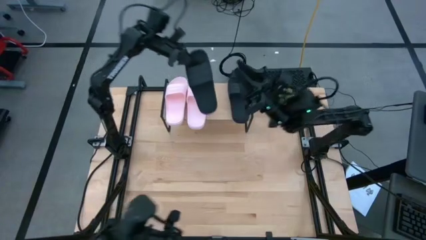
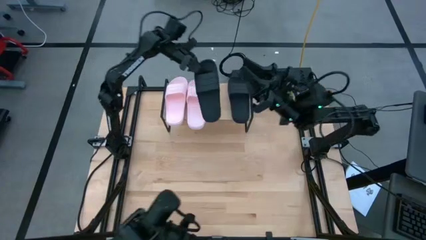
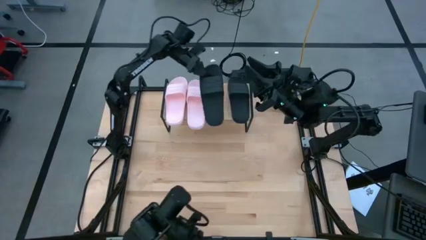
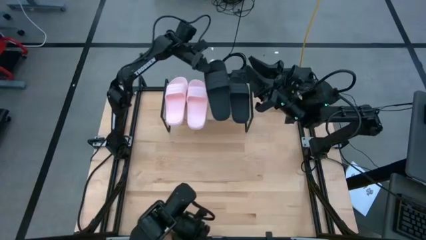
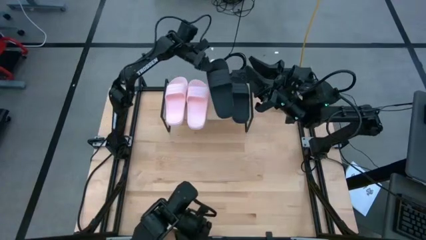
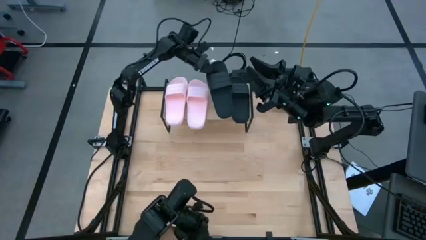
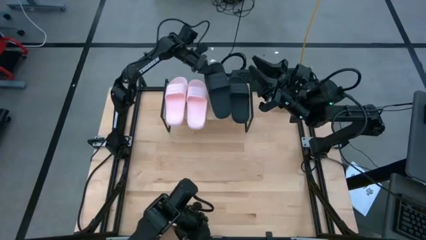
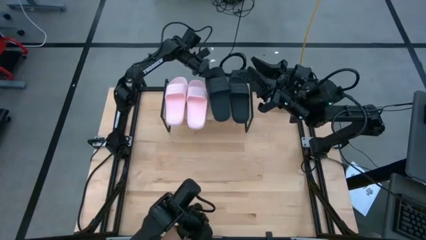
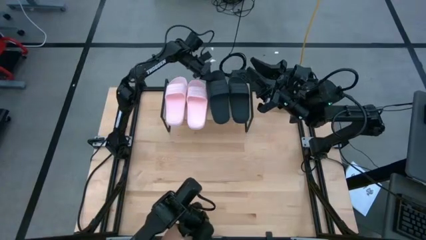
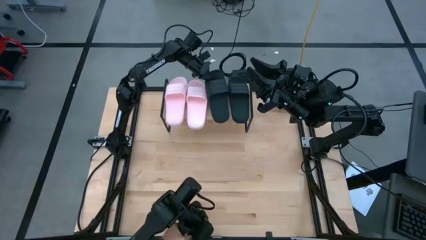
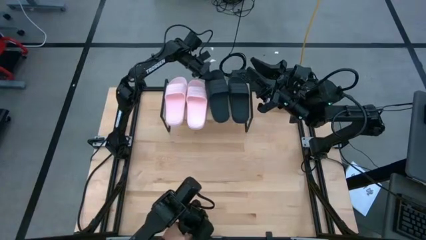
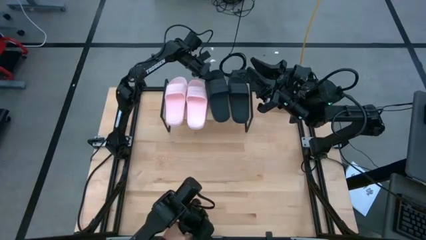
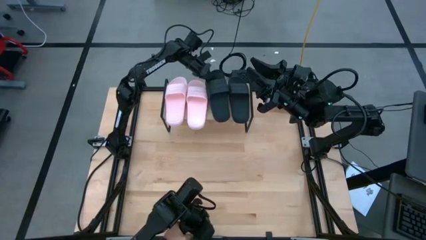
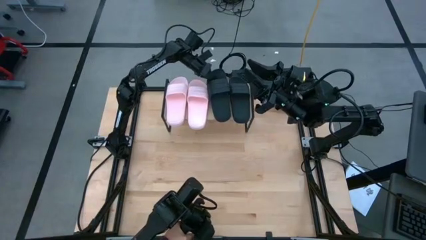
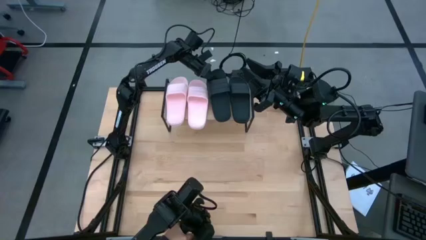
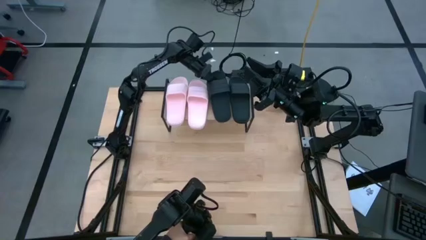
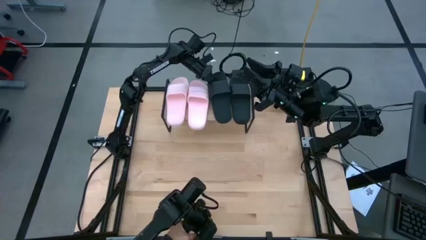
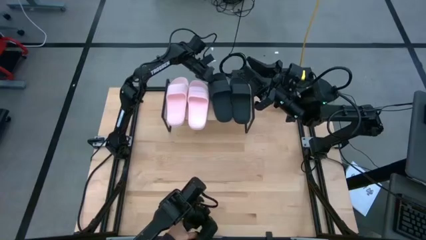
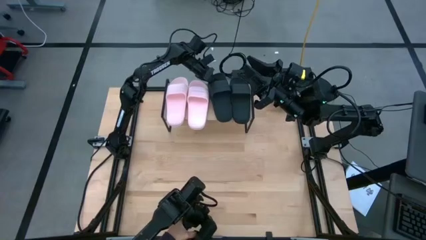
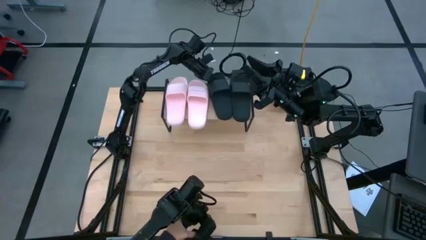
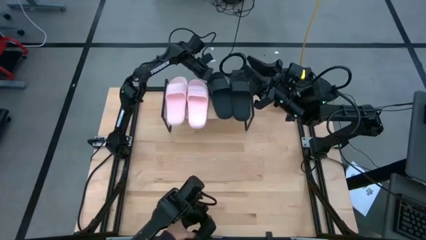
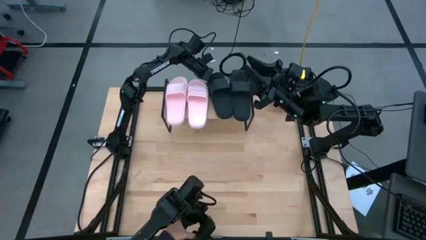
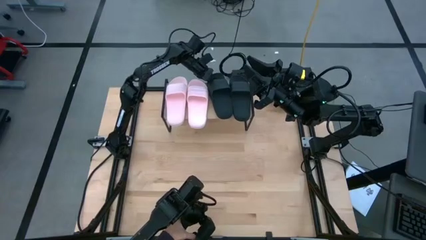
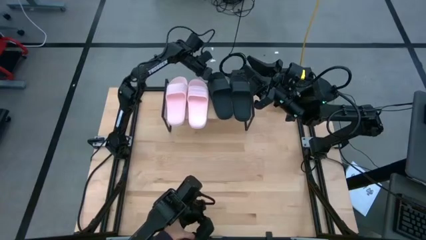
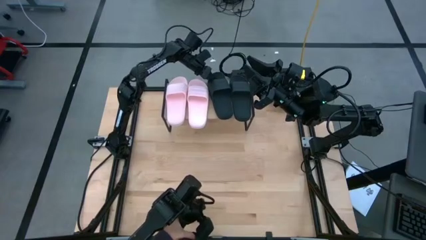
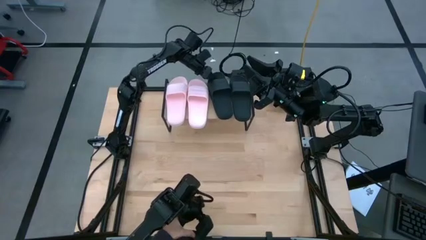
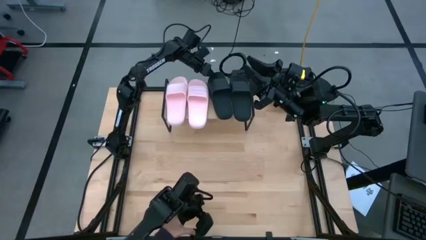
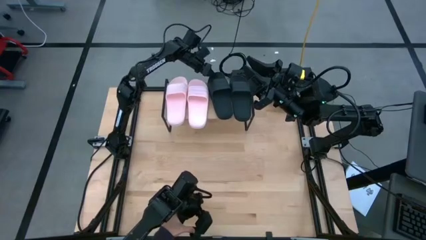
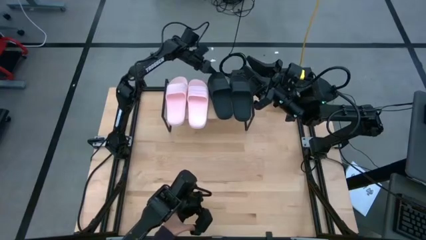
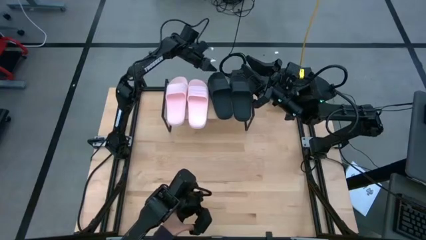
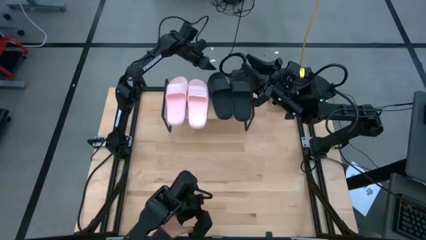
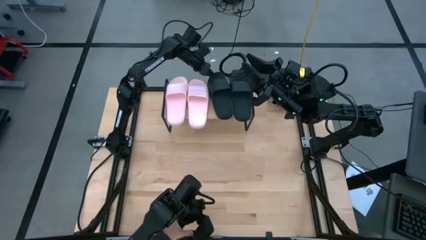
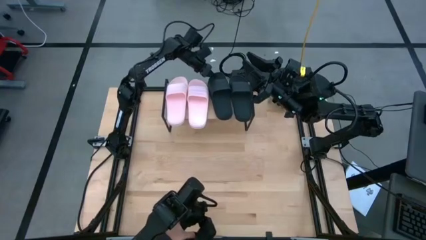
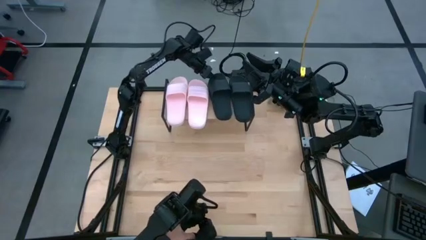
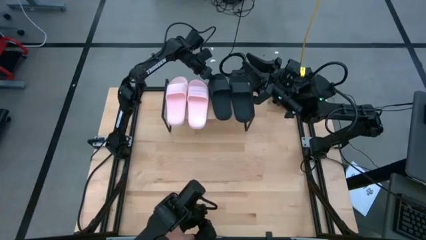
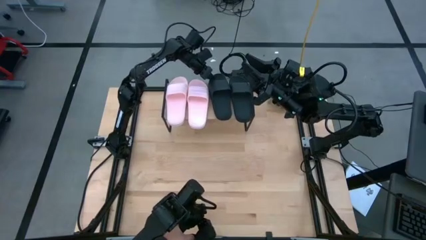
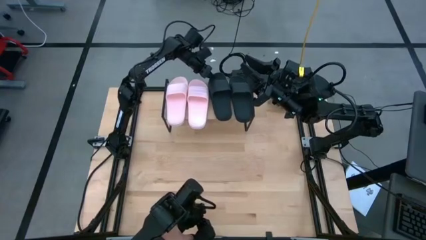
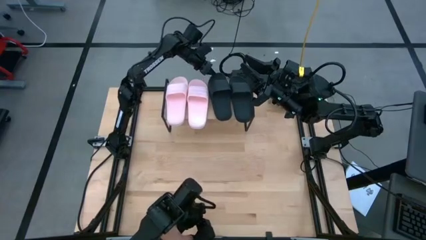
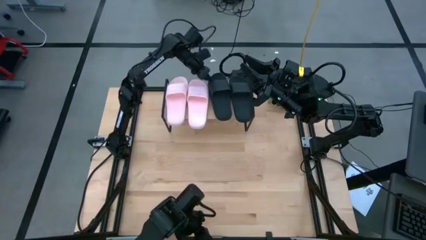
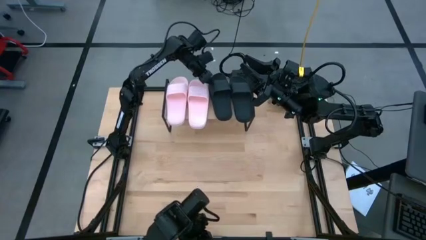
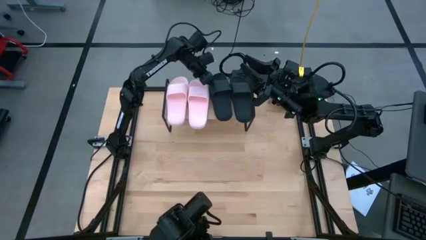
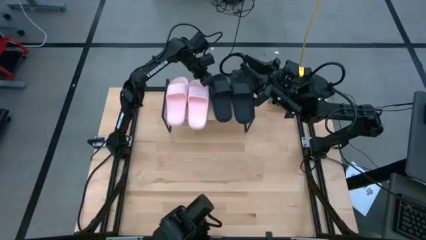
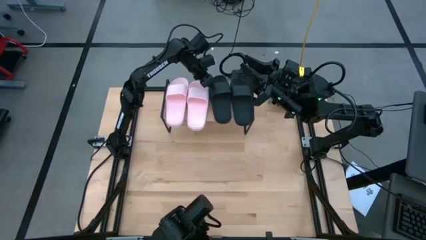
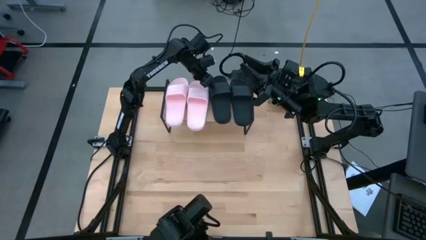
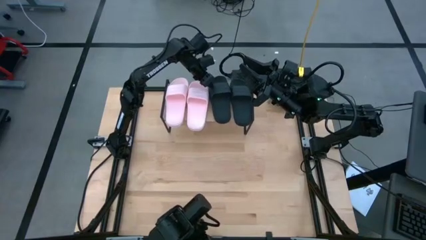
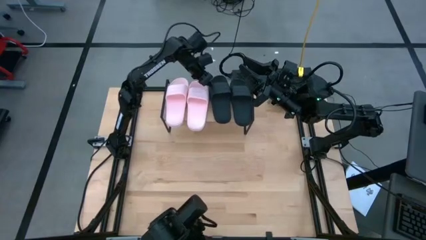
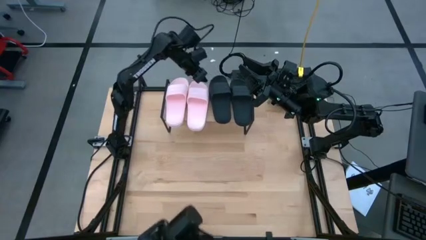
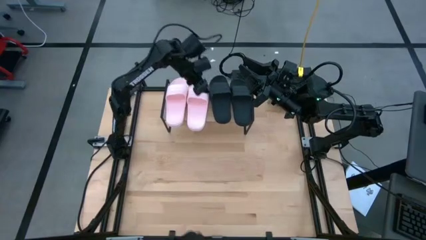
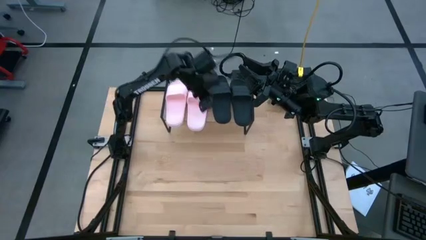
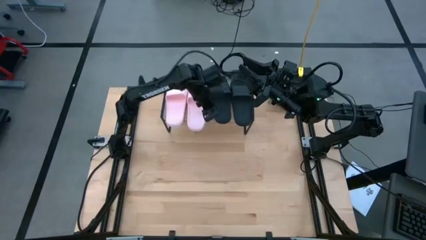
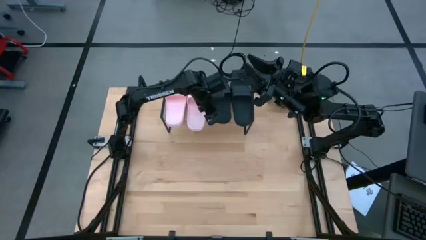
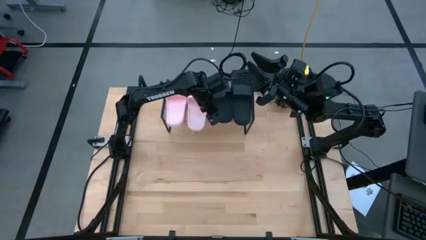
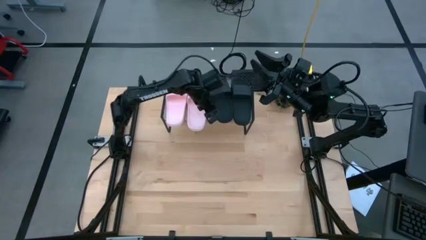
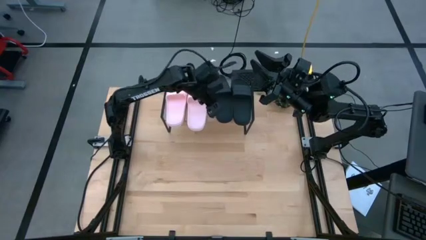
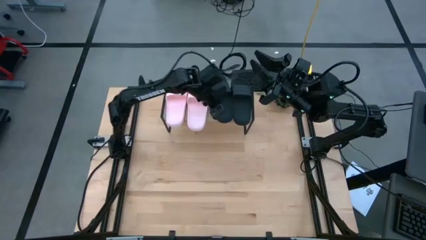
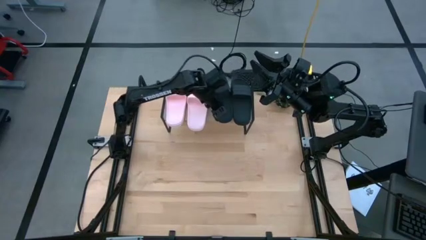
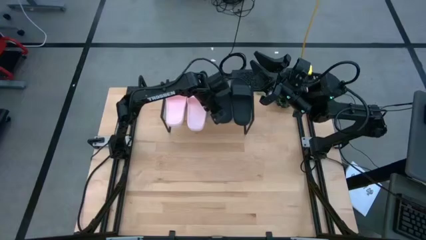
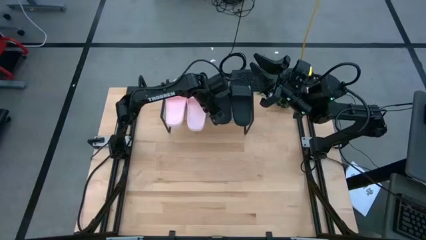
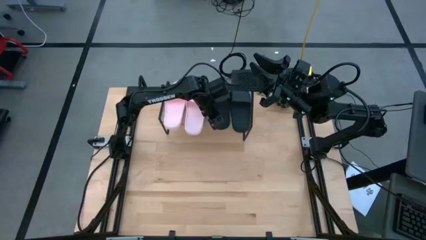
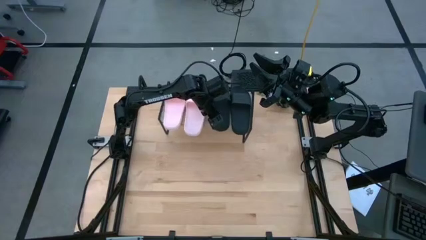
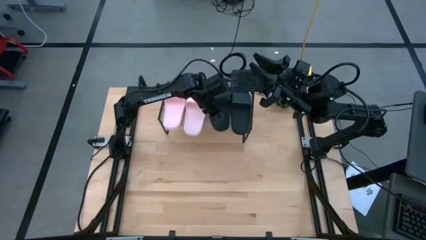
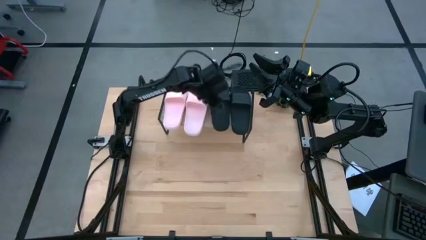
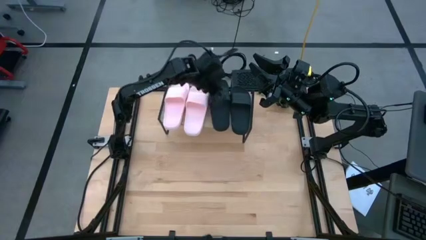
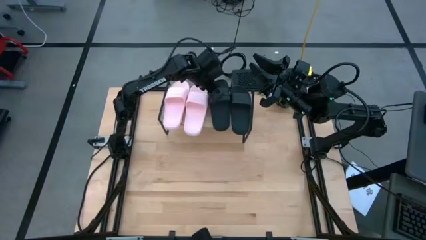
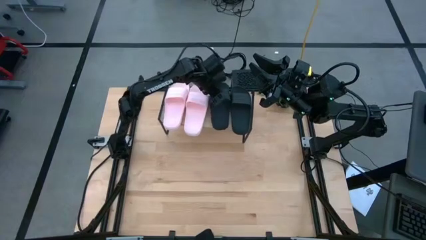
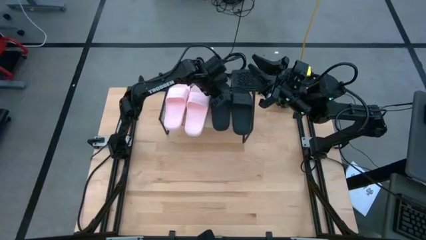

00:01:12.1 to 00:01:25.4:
Task: Pick and place slides into the shelf
Put the black slipper on the shelf

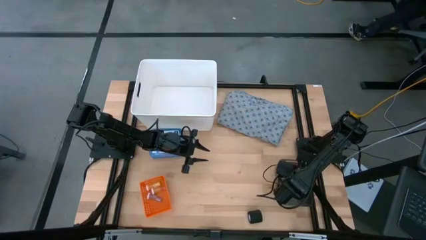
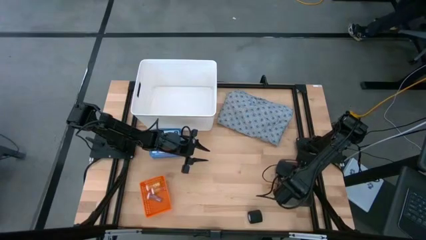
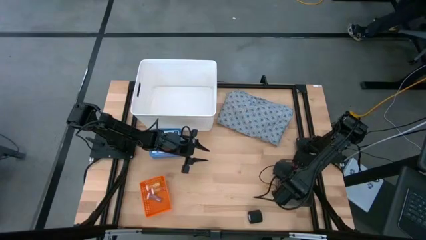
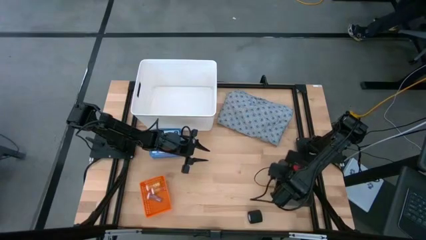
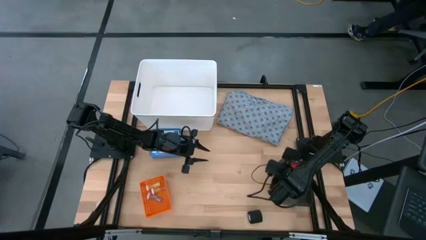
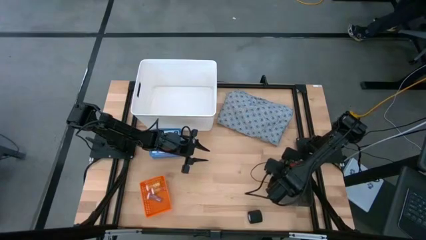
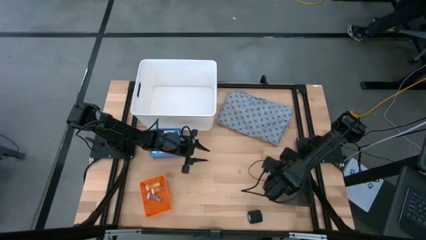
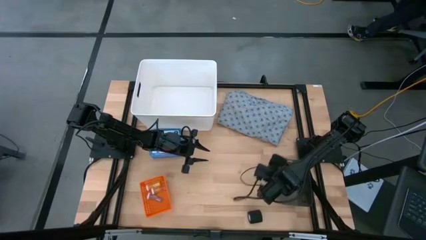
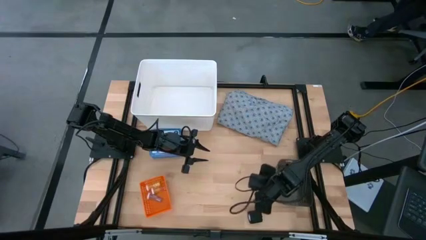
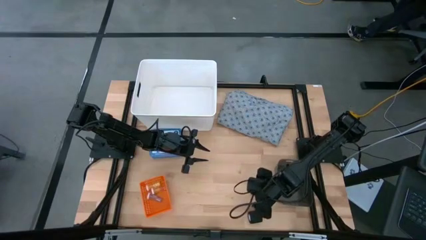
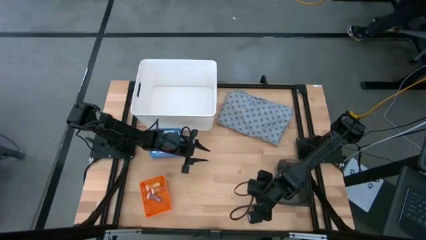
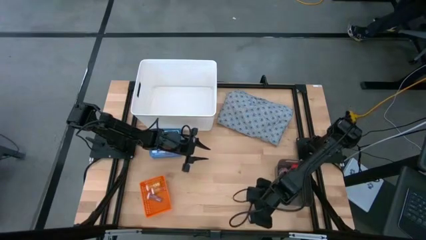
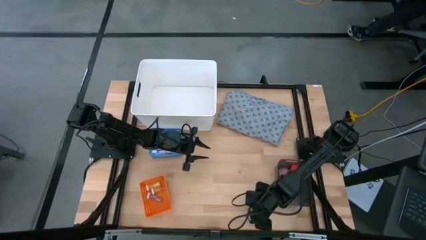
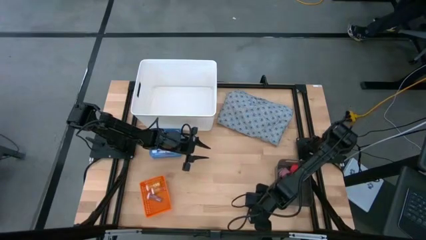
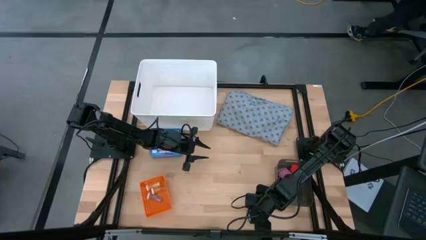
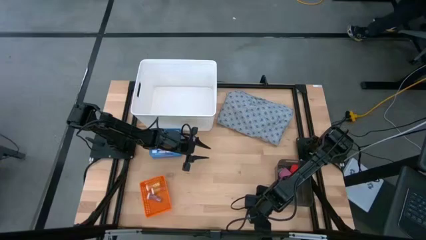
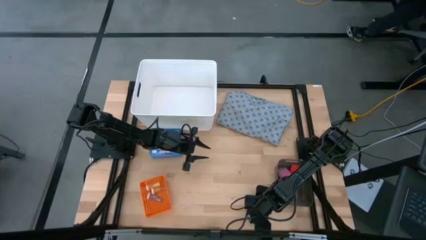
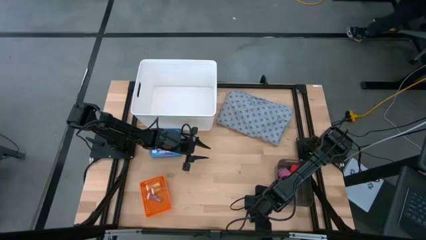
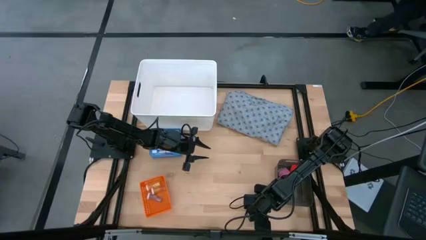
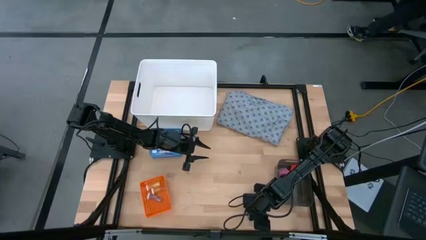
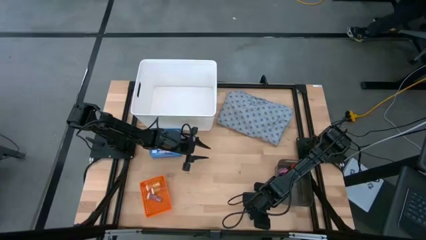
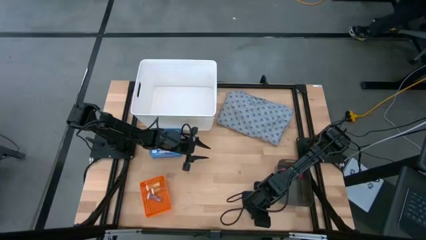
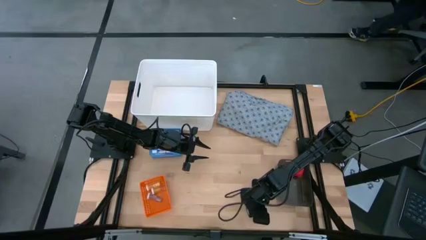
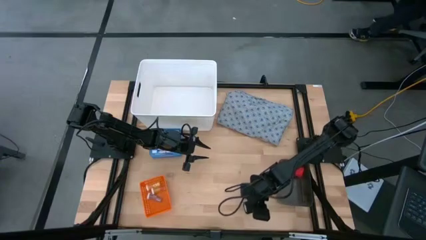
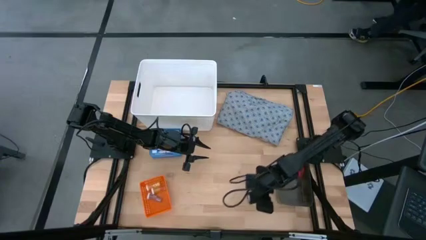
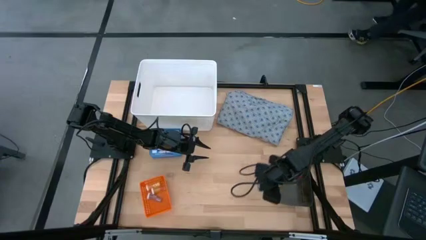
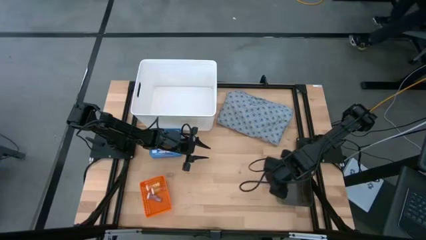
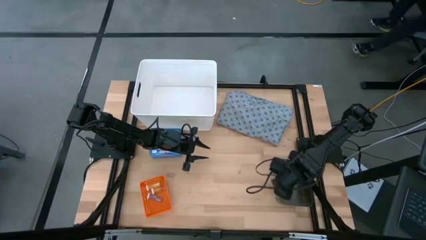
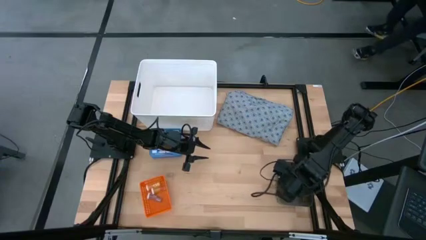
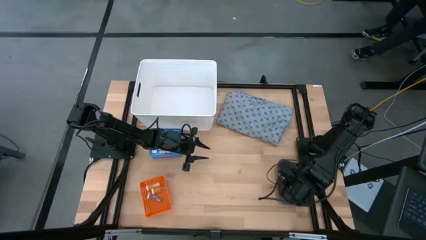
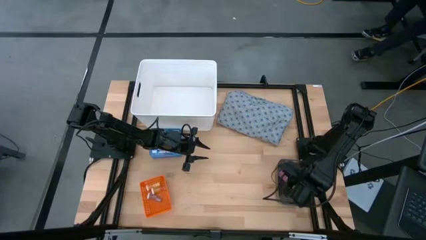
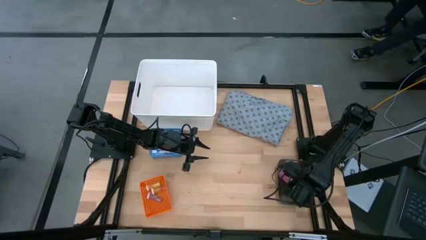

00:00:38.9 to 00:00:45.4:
Task: Pick & place medical supplies in basket/bin
Put the black bandage into the black bin
